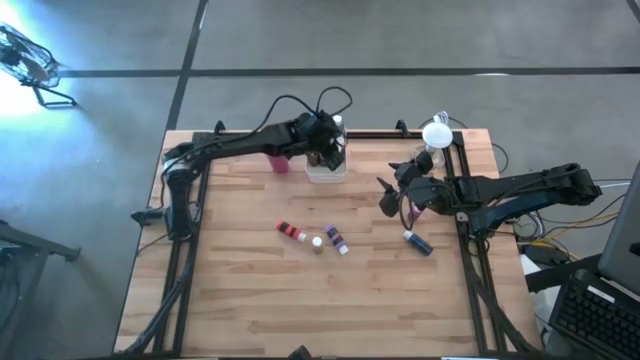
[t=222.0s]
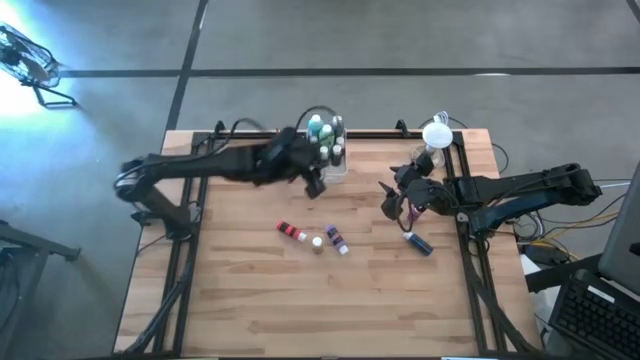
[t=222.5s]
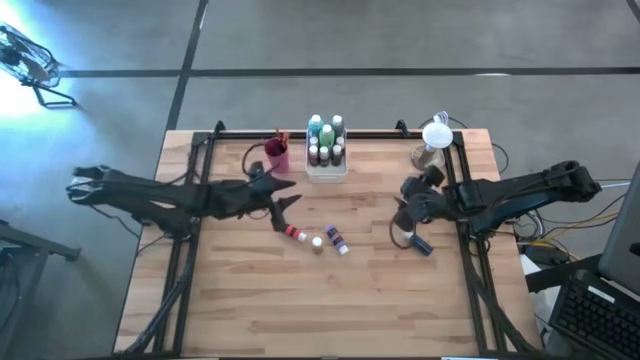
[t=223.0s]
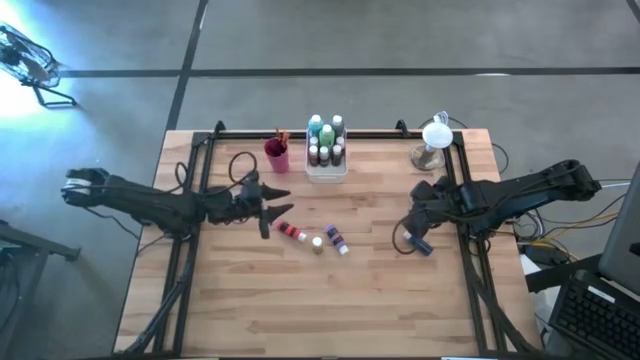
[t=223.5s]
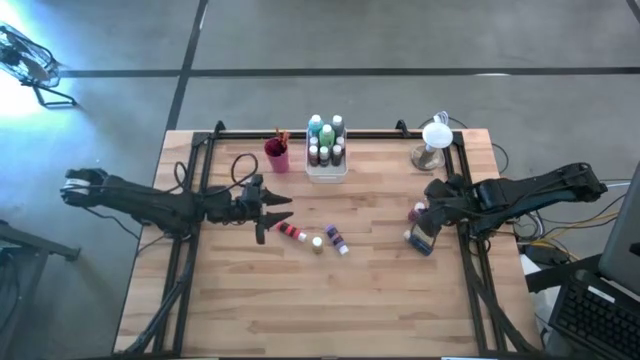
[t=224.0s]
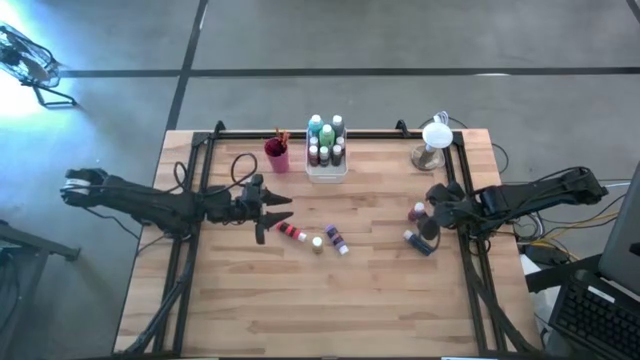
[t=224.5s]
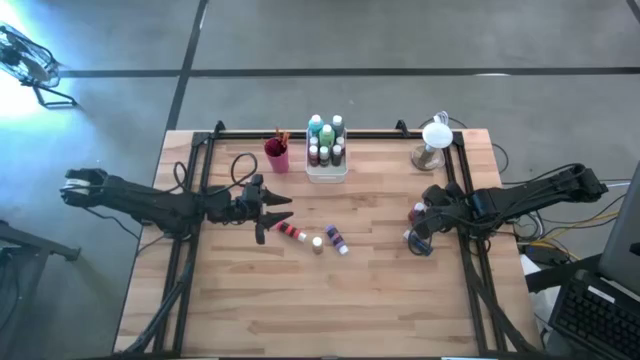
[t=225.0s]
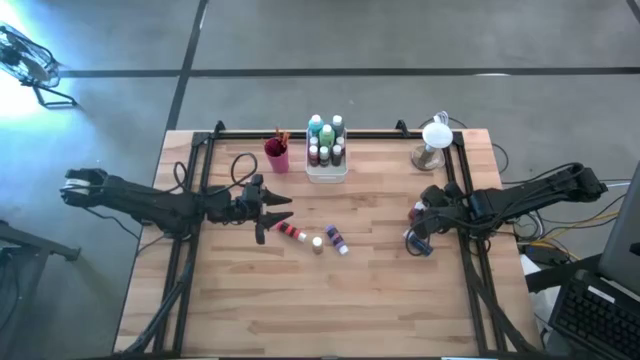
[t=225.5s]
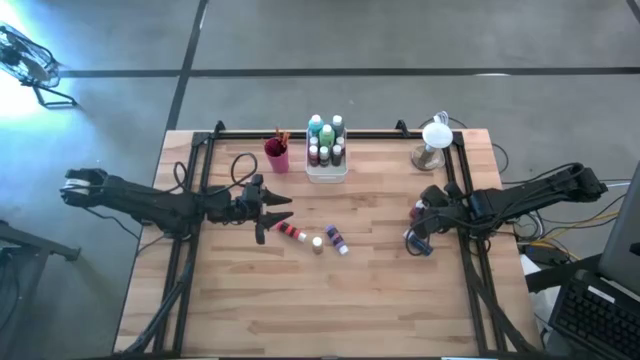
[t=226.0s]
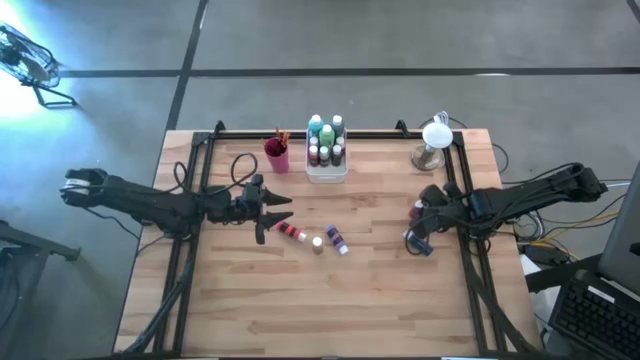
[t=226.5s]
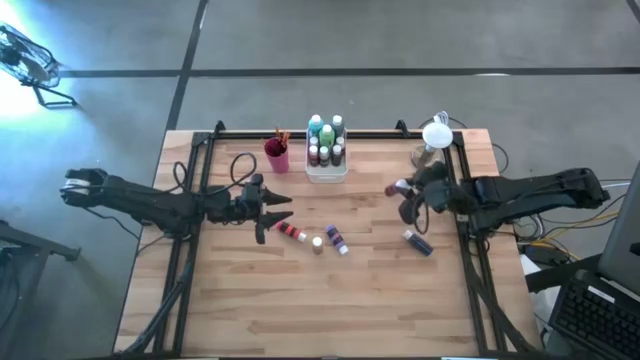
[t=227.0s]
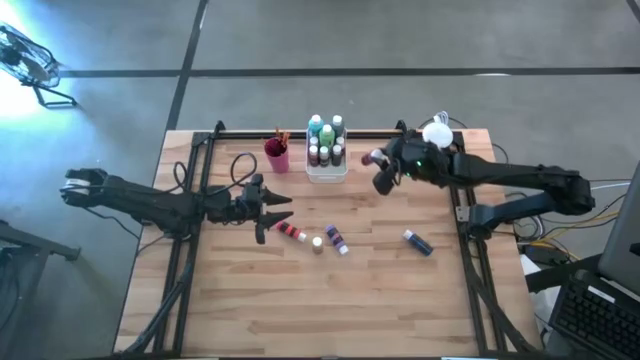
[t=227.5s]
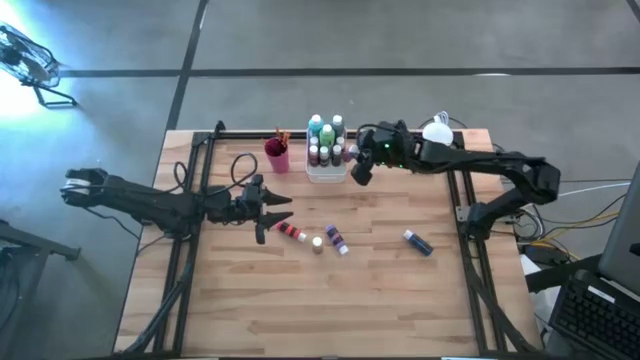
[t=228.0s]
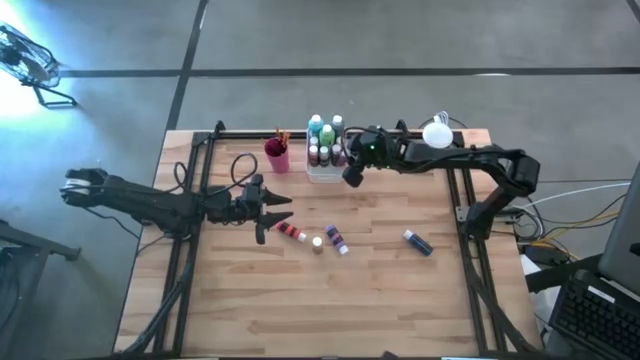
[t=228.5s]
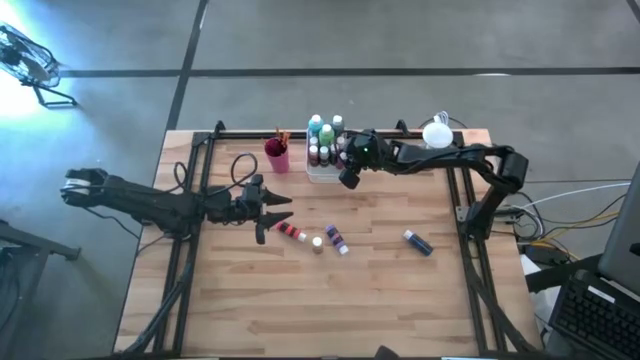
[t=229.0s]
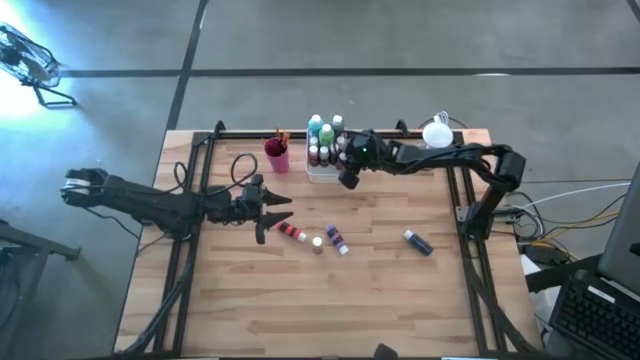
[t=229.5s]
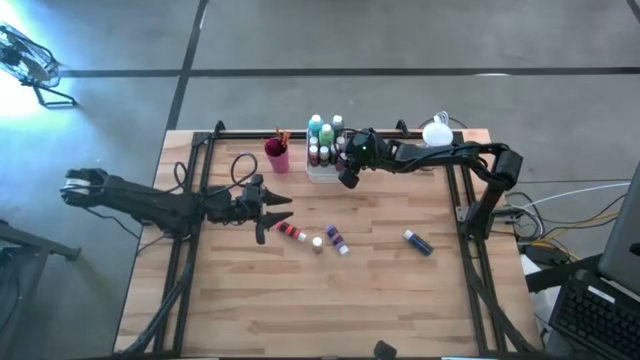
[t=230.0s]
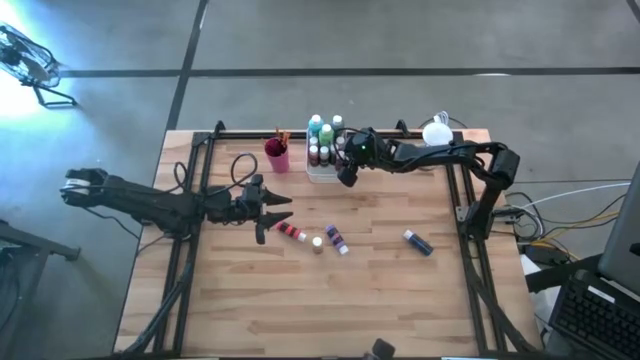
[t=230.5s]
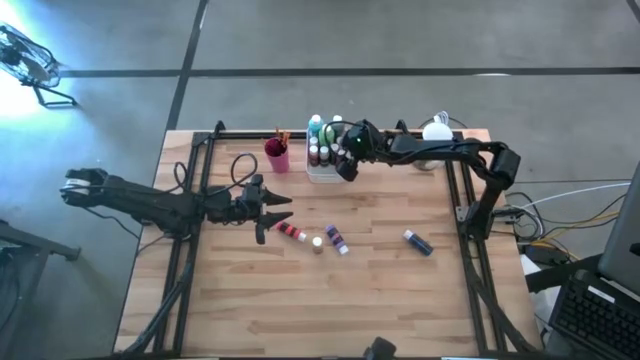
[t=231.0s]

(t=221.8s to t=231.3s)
Task: Pick & Place Paint Supplies
Put the pink paint bottle into the white bin

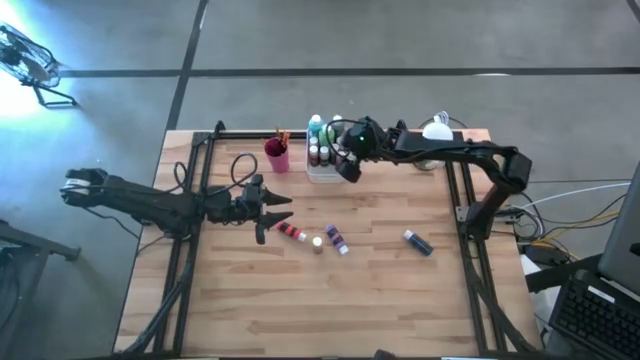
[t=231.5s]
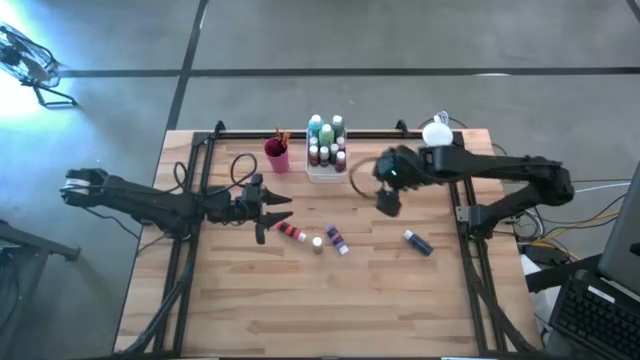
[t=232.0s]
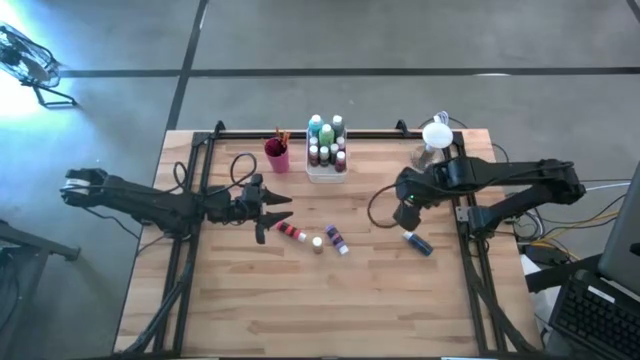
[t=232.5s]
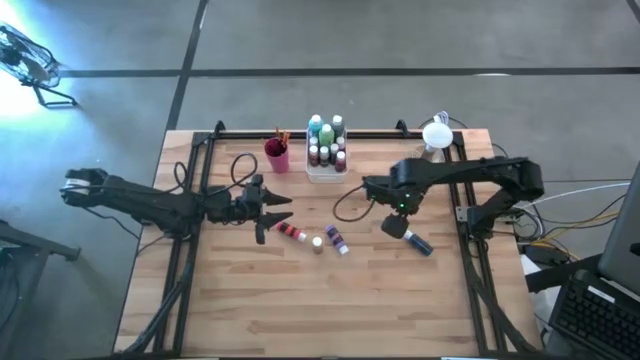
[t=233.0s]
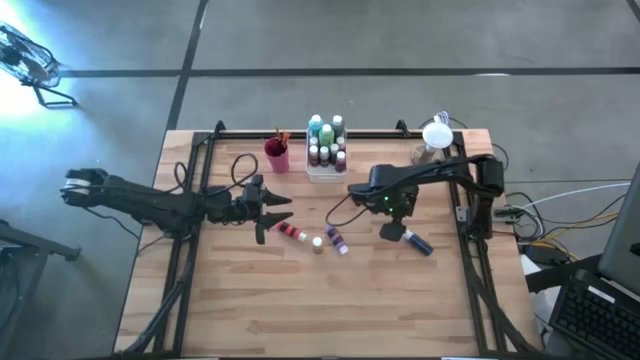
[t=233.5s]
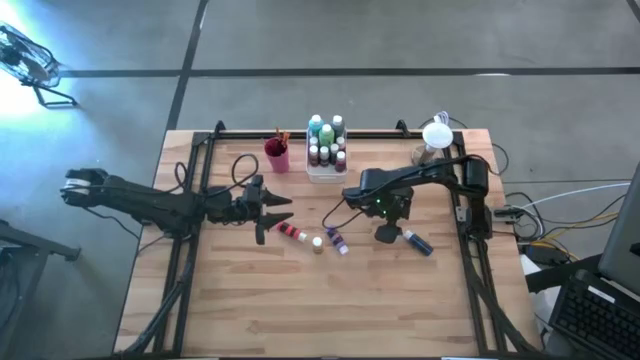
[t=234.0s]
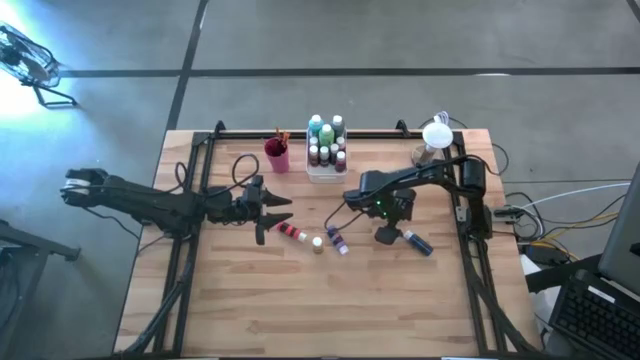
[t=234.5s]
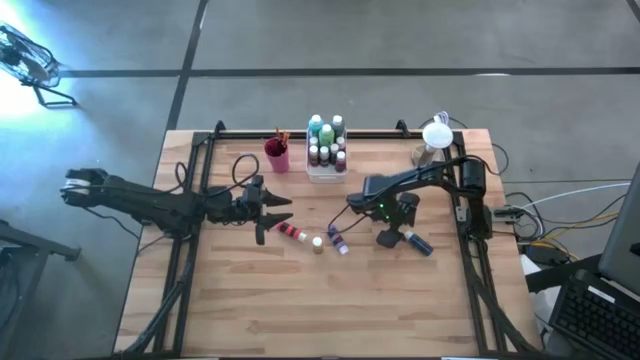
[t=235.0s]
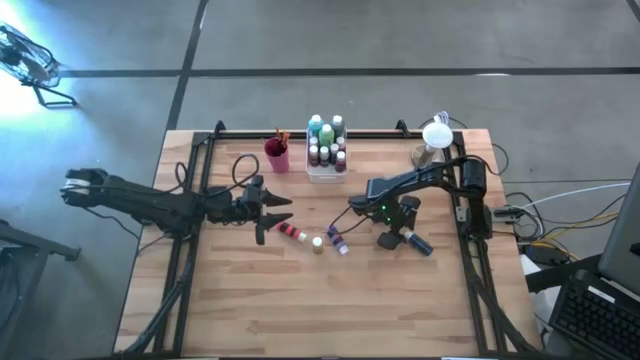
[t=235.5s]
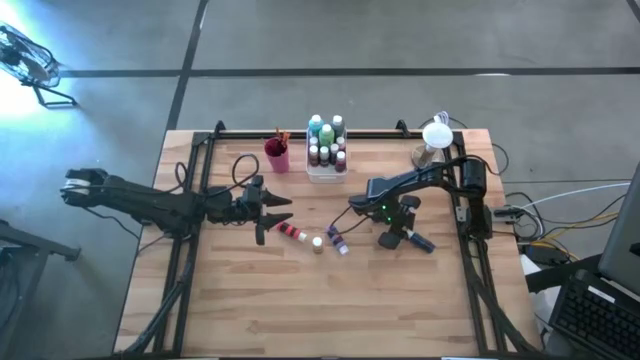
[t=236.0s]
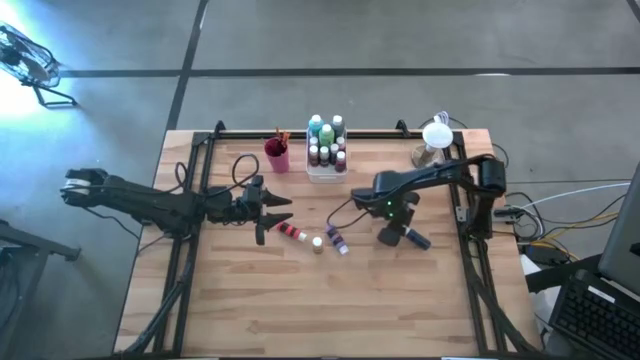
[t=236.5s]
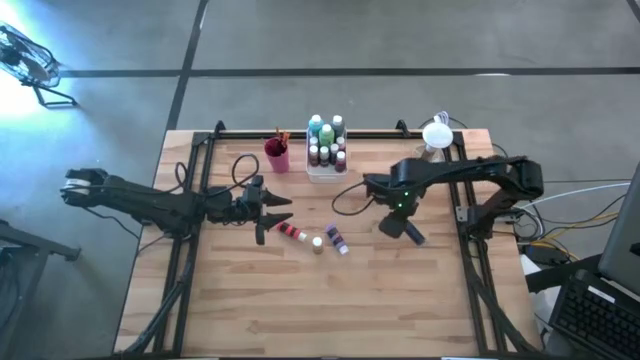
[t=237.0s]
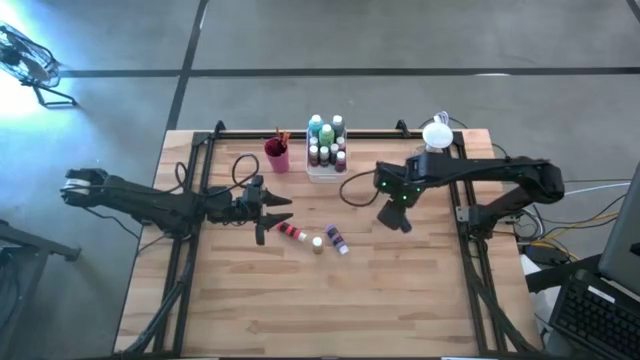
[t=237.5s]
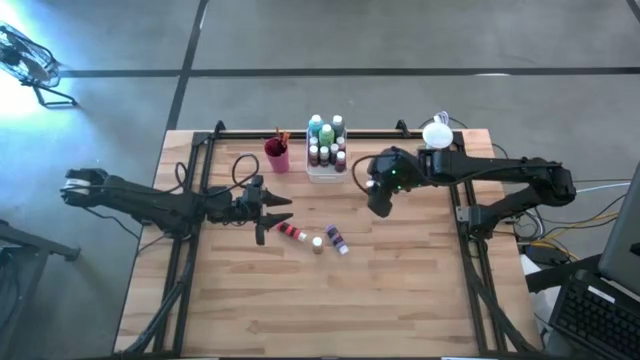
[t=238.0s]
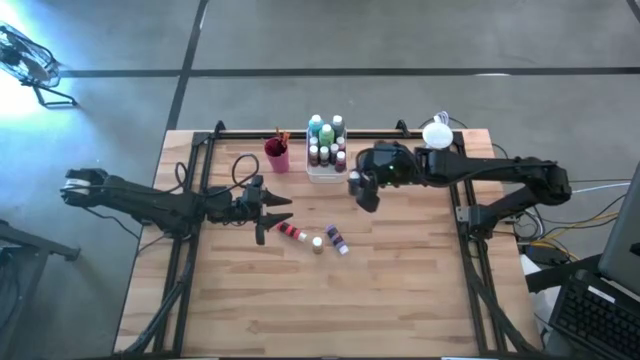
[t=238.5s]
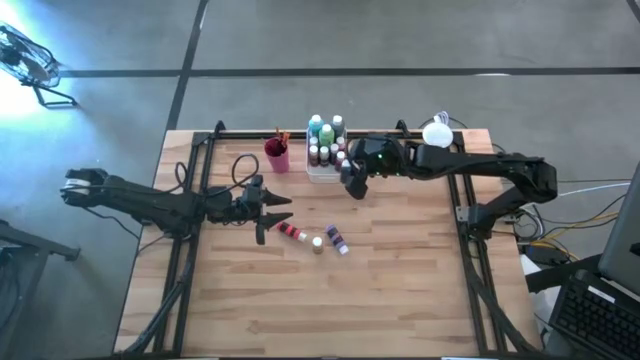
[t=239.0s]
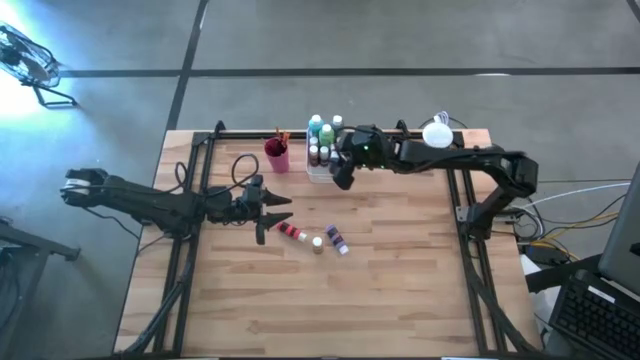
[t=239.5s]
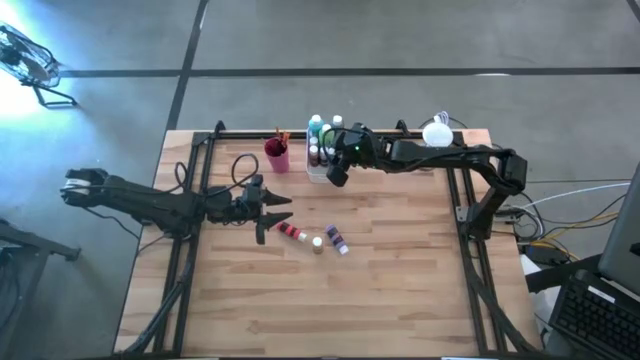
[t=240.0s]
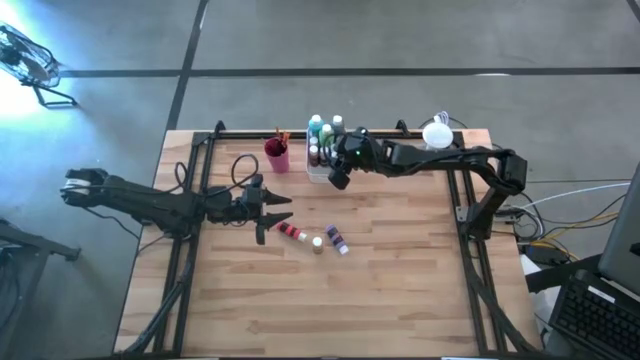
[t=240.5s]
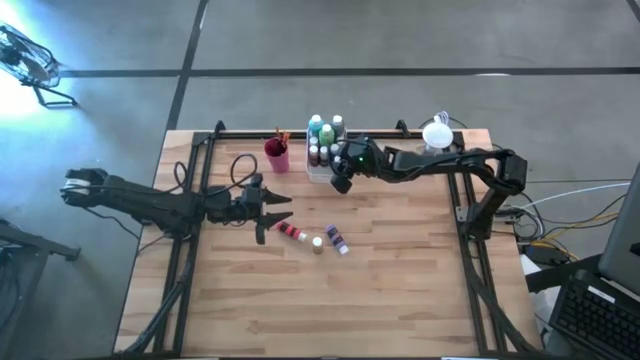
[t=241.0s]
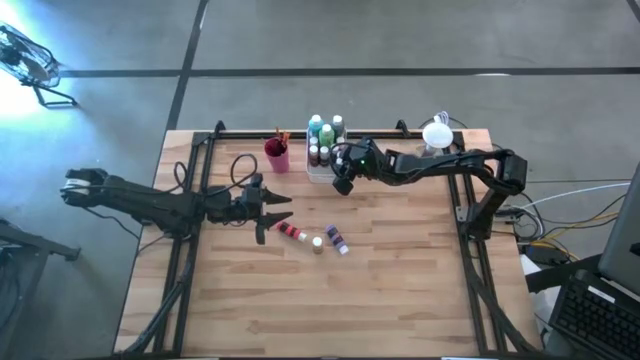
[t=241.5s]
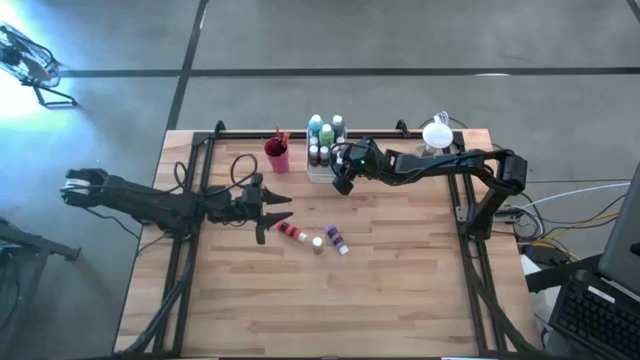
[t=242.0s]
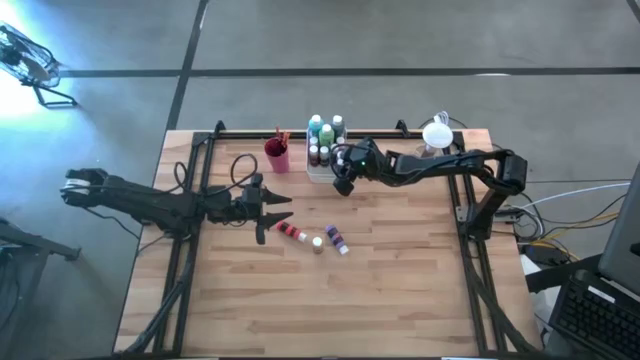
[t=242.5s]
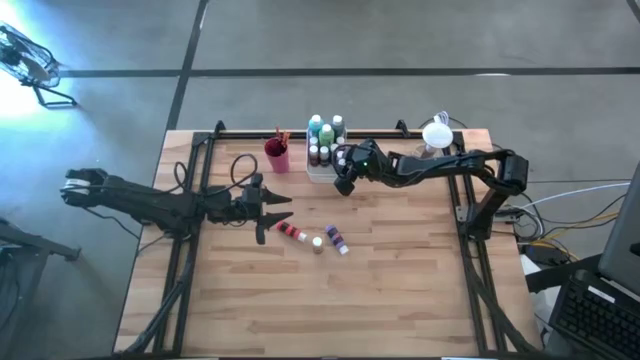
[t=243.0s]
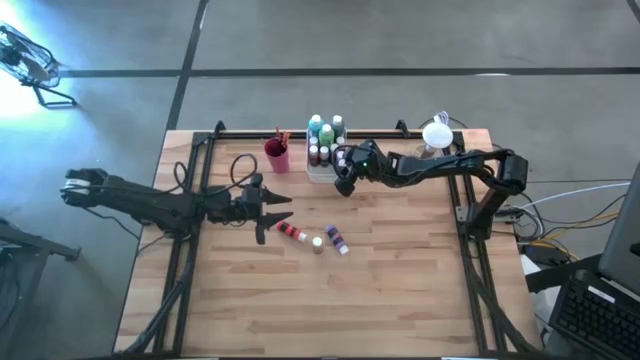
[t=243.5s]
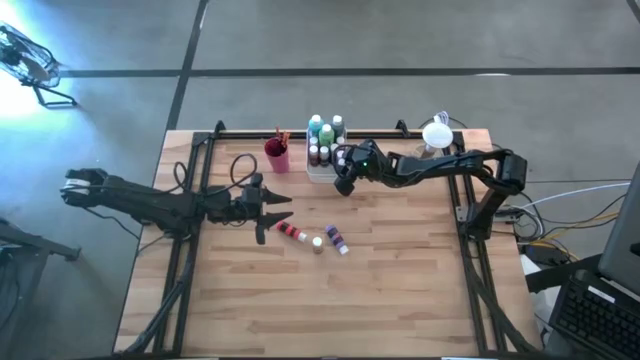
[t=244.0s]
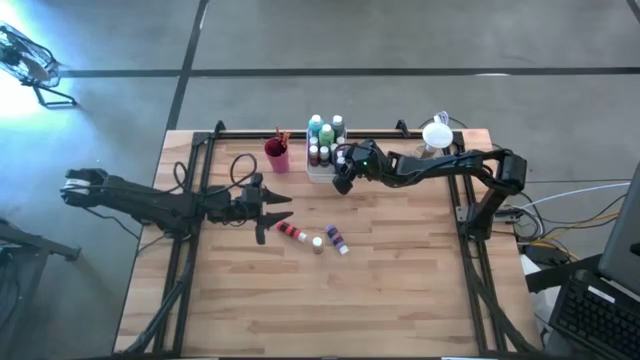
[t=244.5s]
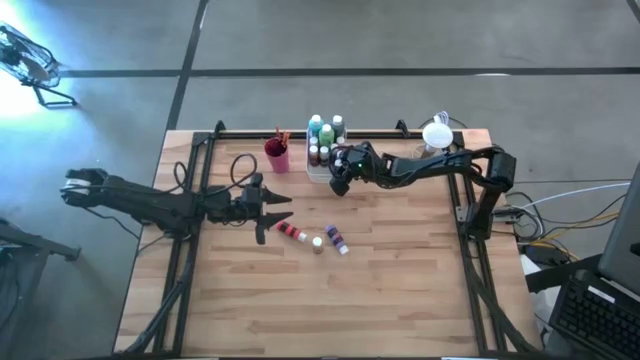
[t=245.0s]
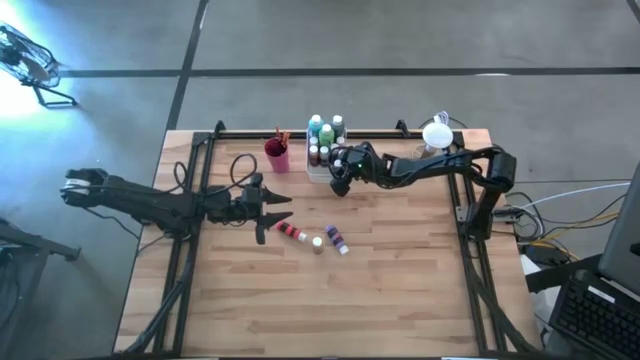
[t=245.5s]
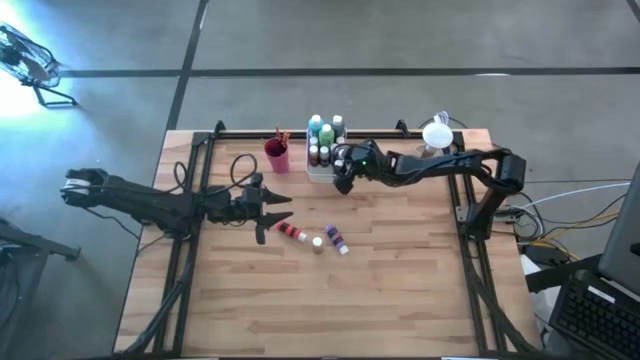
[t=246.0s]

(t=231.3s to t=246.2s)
Put the blue paint bottle into the white bin
